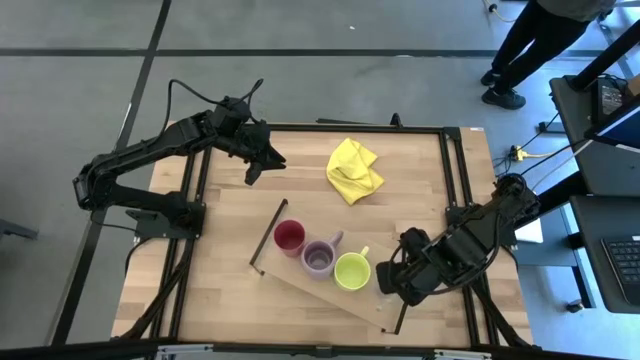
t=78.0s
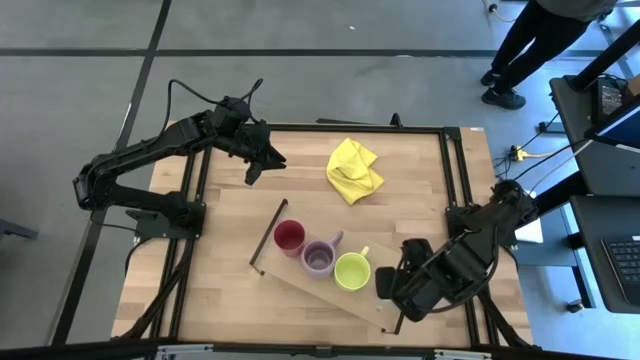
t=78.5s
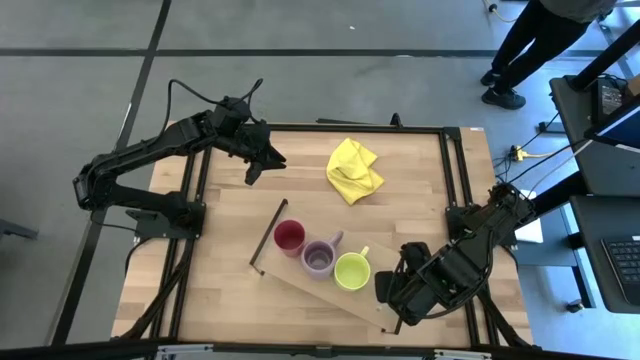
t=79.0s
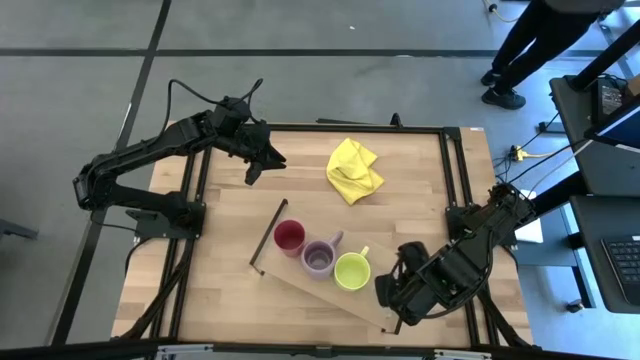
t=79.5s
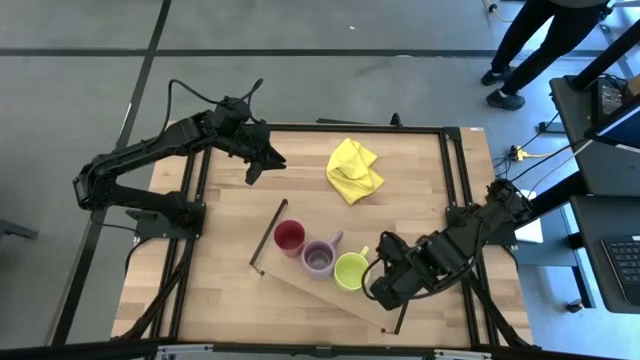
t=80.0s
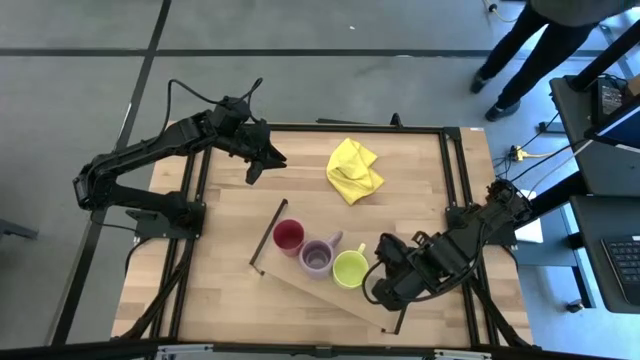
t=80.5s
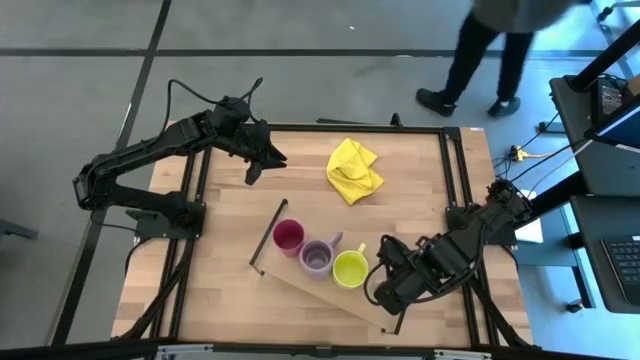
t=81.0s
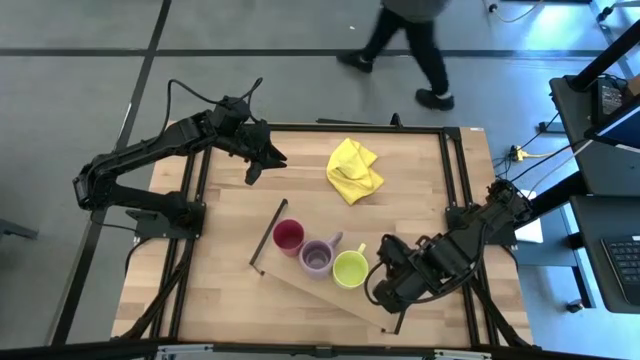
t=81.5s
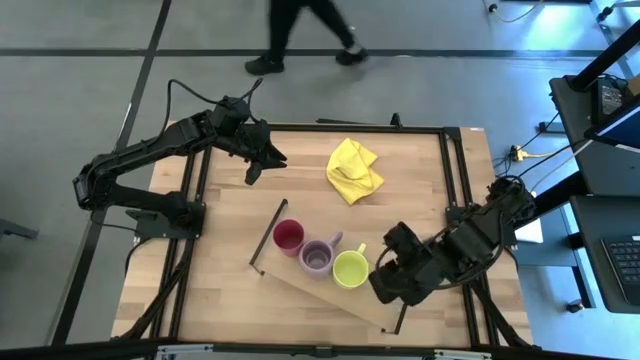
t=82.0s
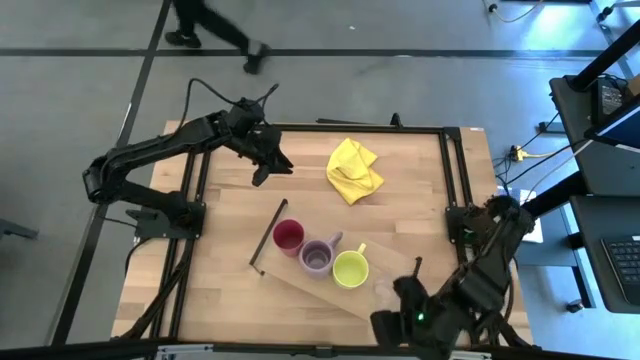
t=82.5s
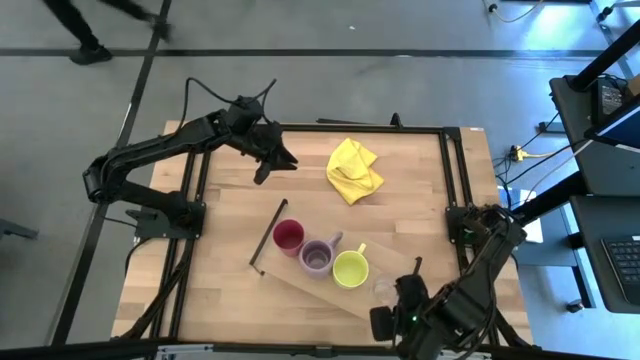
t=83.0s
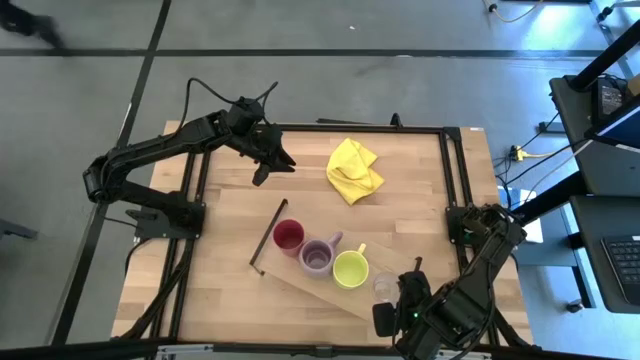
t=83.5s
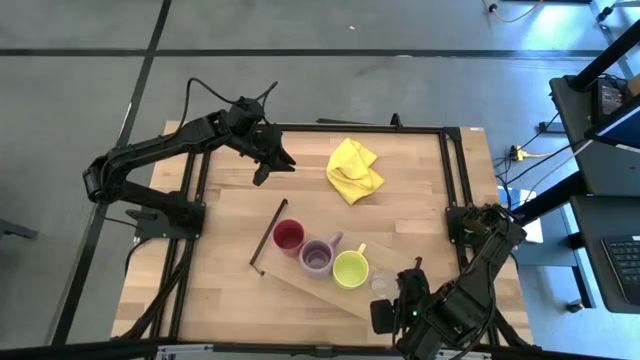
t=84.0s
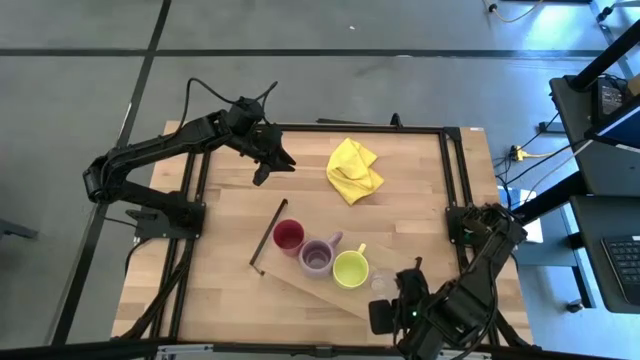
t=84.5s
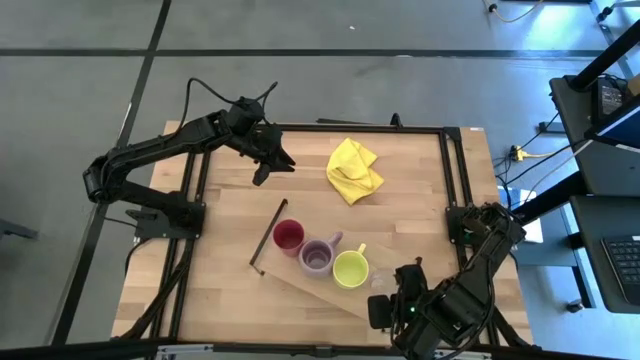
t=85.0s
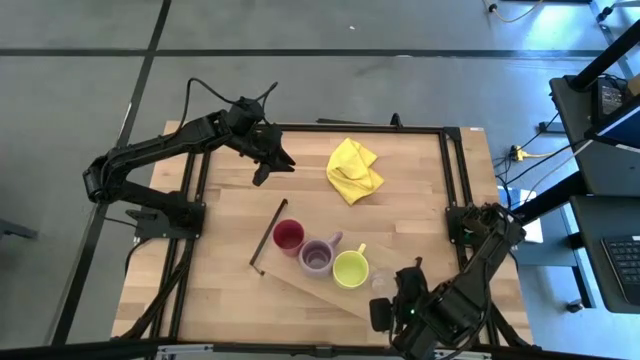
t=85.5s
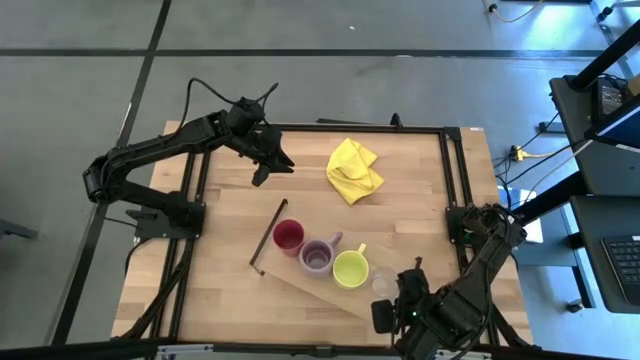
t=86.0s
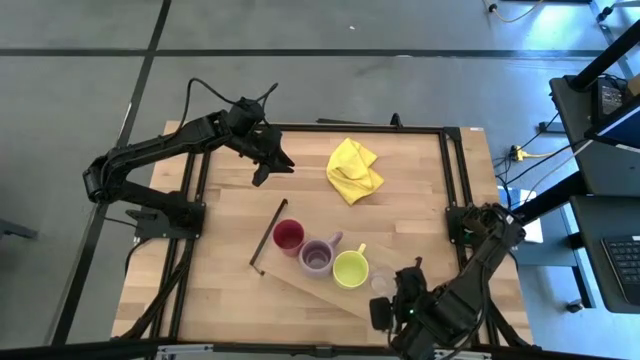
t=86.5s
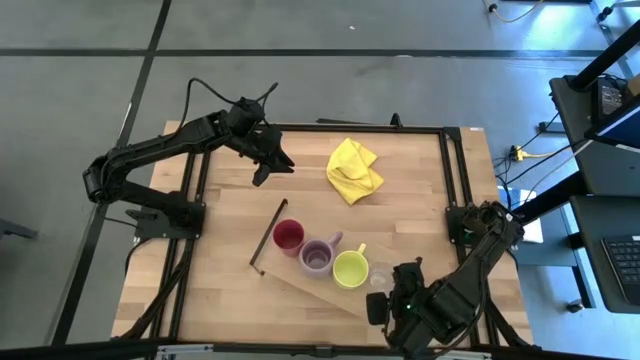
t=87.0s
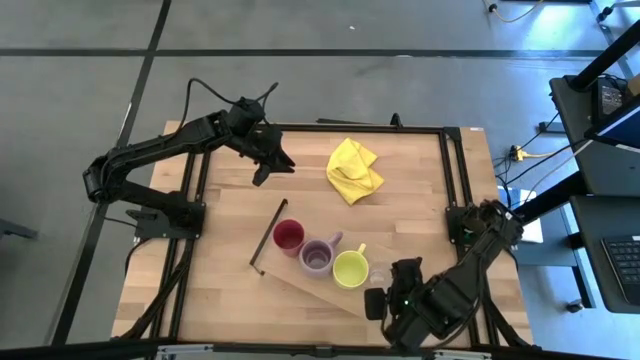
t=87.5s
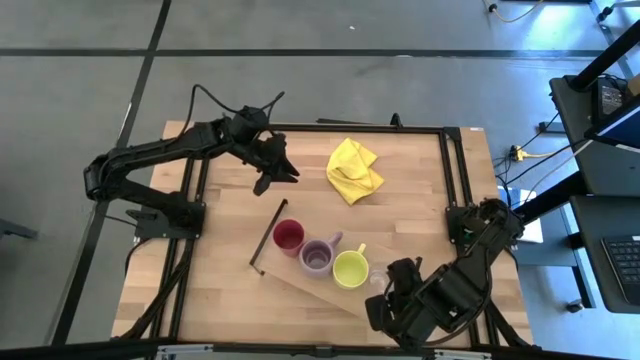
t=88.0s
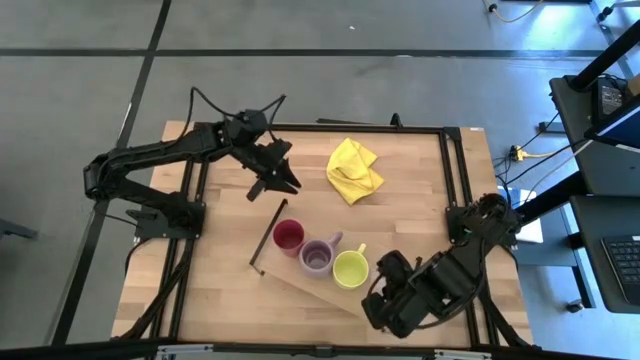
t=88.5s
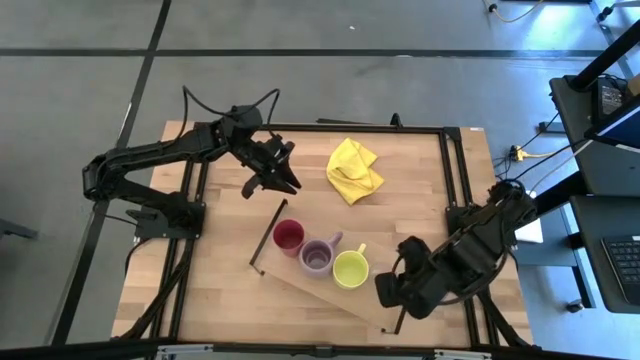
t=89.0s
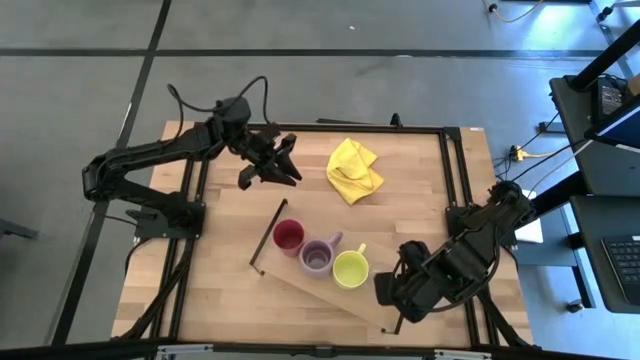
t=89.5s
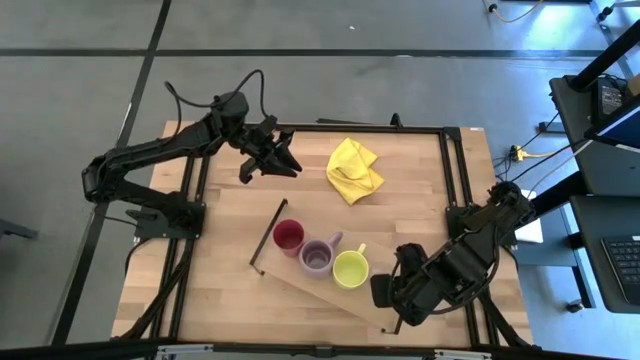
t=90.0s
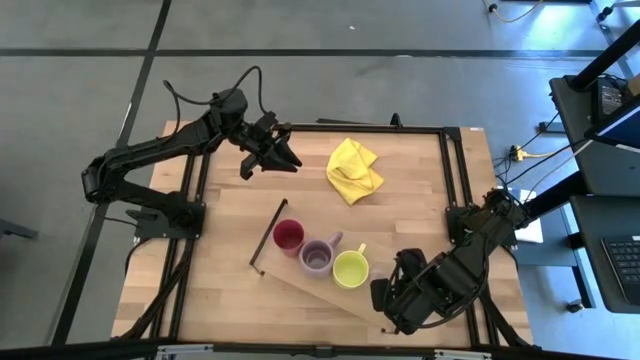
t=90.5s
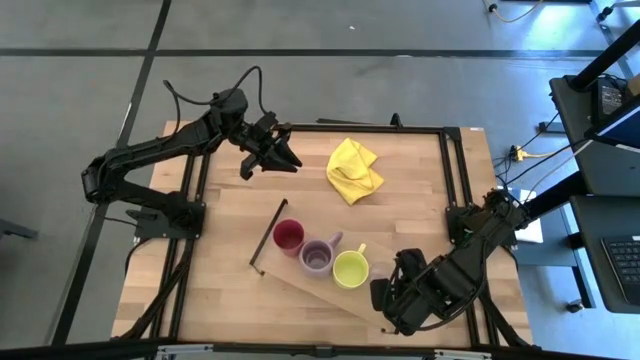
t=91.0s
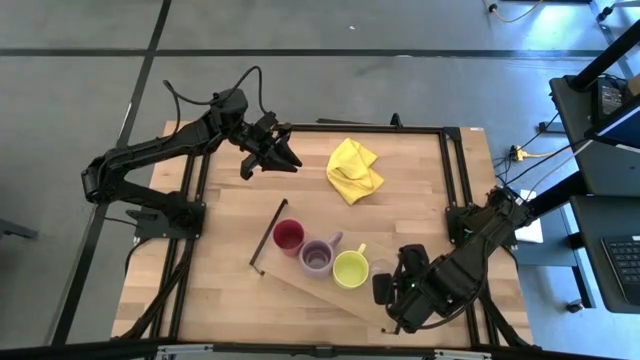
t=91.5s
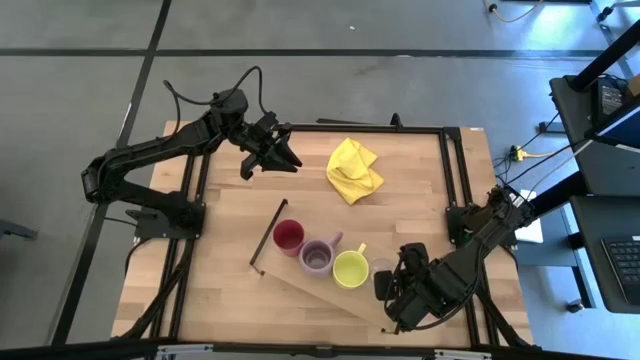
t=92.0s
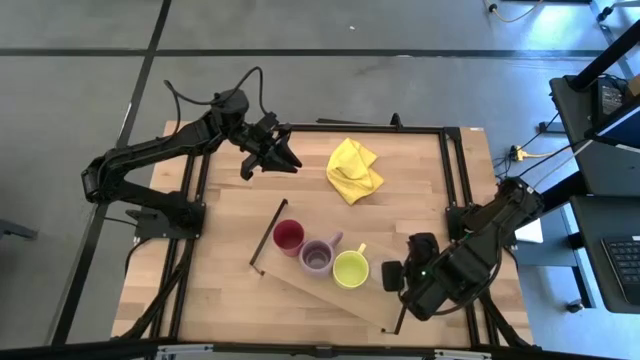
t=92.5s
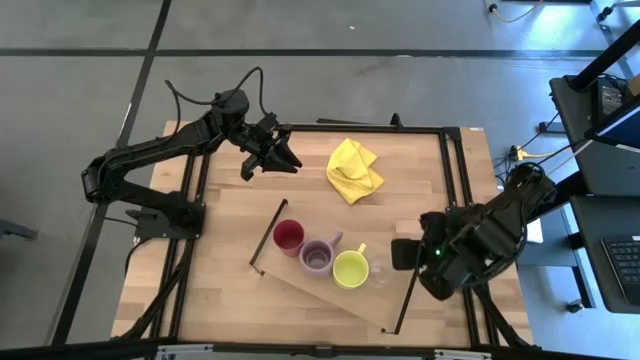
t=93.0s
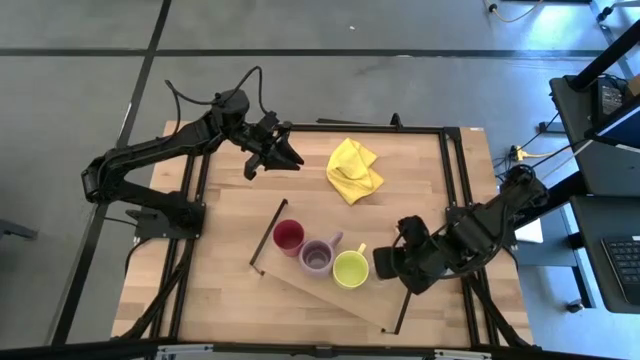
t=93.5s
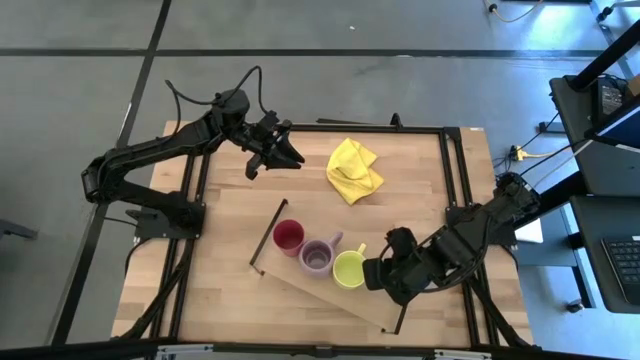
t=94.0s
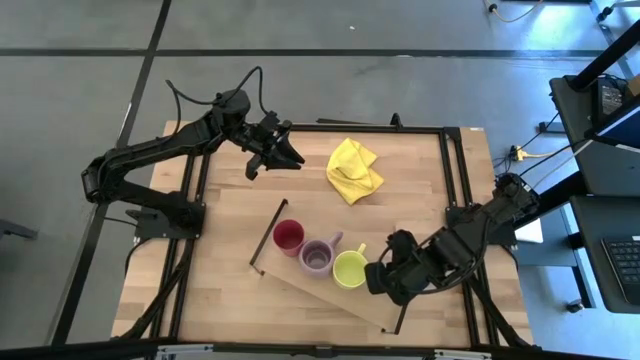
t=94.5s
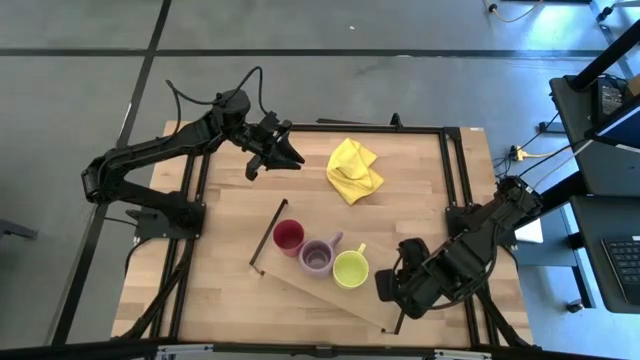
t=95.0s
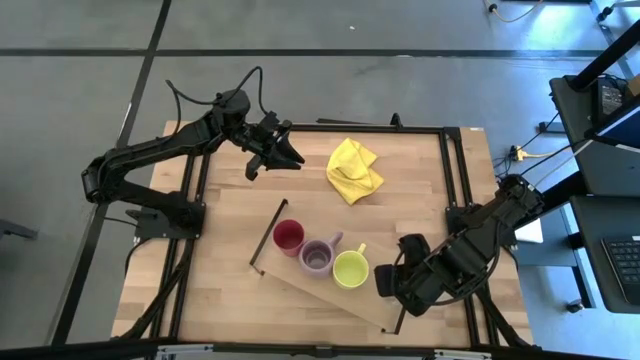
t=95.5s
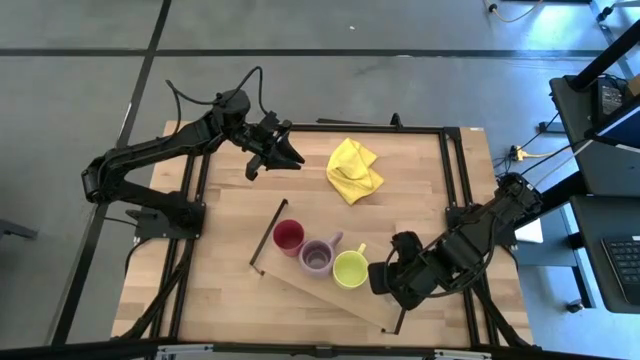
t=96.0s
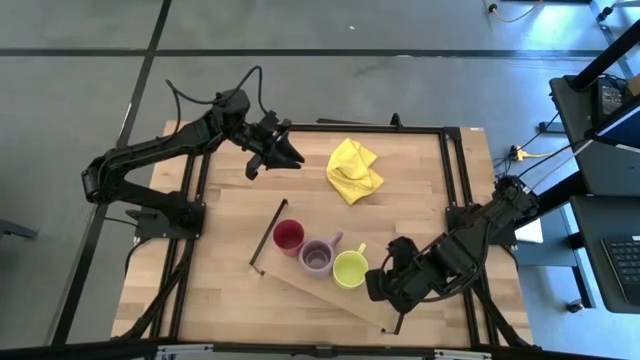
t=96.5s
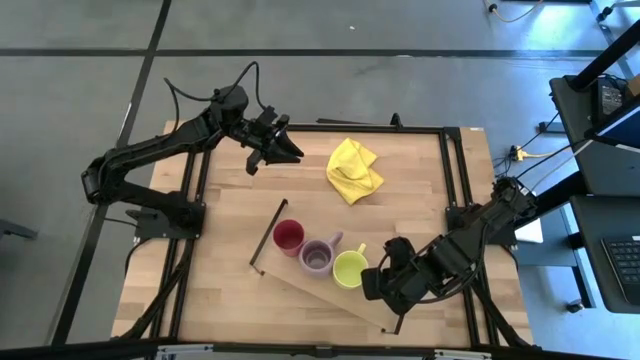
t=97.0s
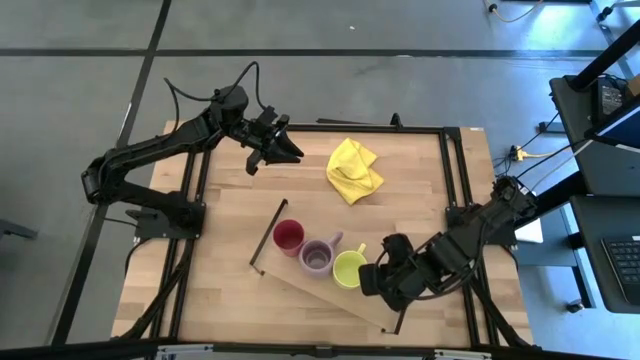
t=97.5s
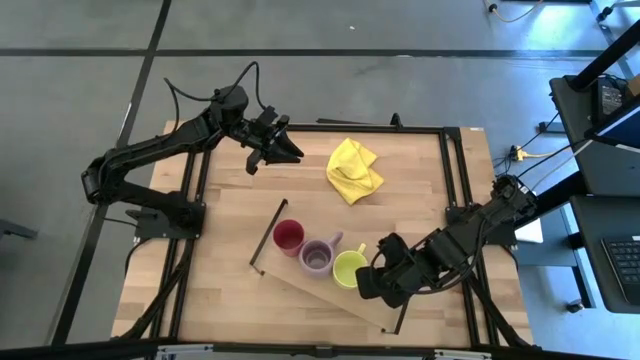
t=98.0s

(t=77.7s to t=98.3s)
Task: Stack small to large cups/mugs on shelf
Put the transparent mug on the shelf
